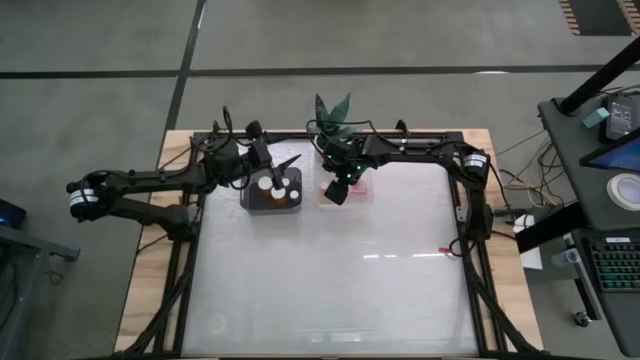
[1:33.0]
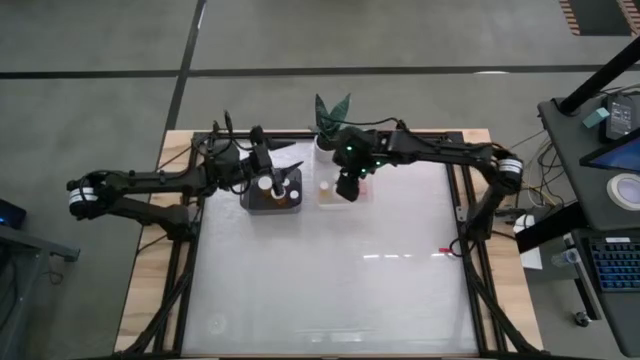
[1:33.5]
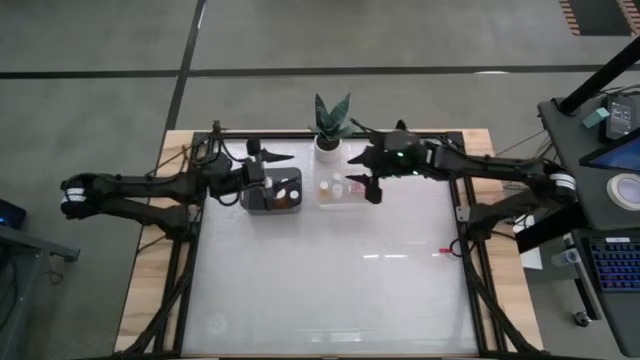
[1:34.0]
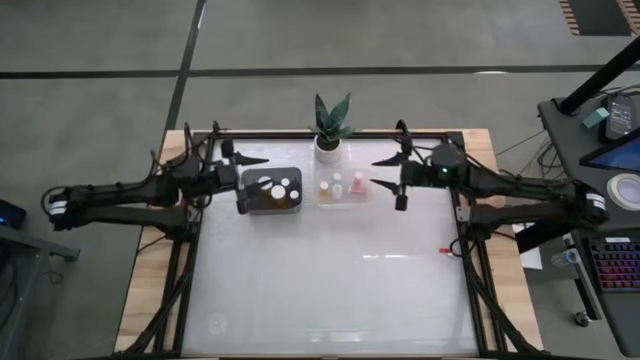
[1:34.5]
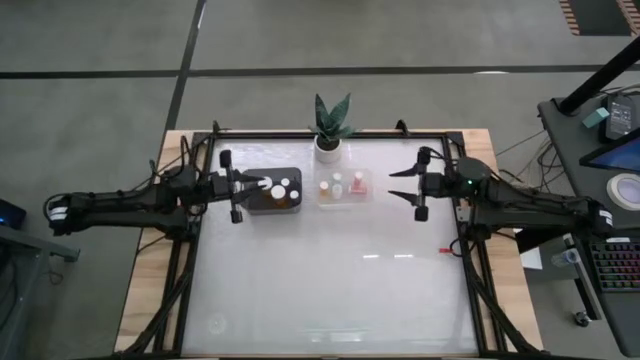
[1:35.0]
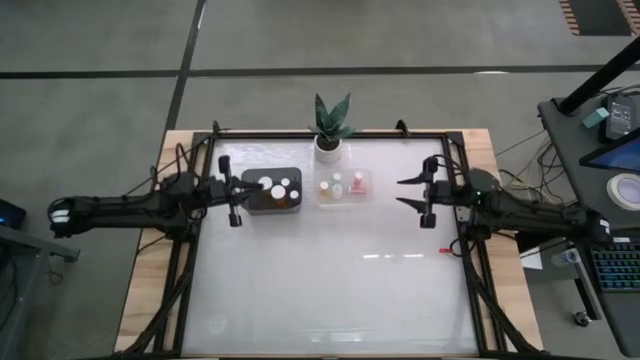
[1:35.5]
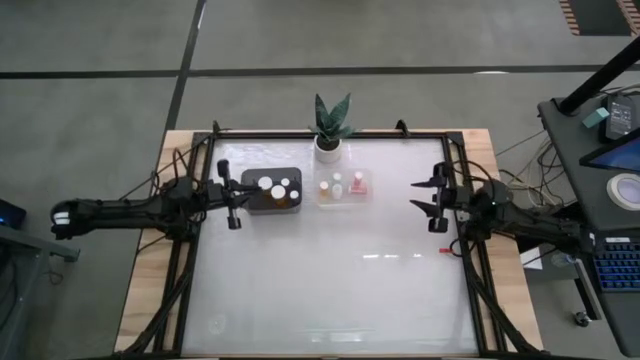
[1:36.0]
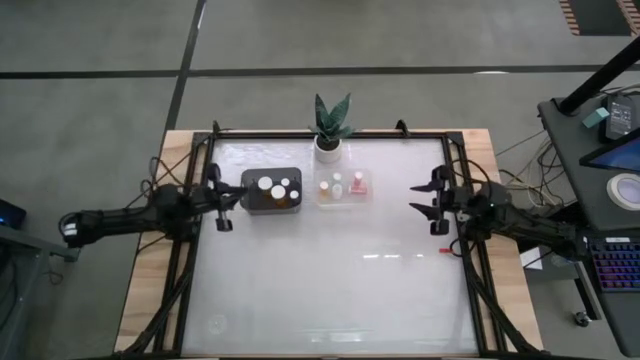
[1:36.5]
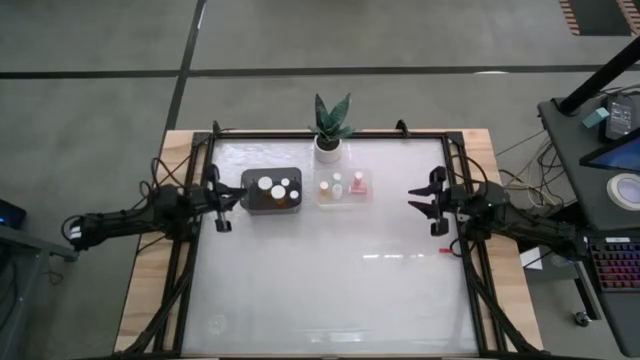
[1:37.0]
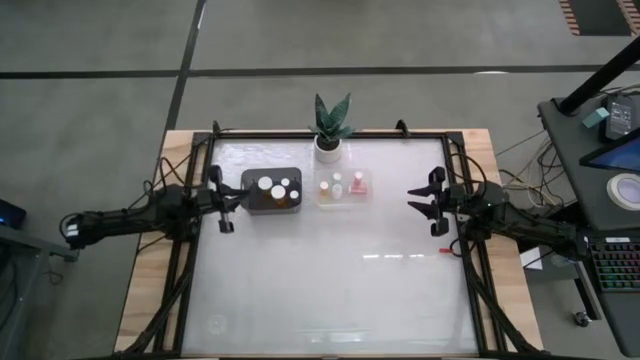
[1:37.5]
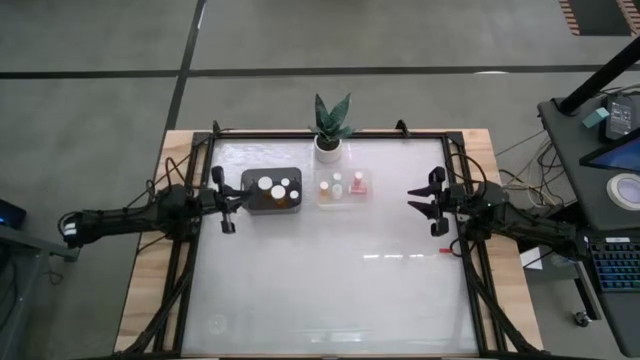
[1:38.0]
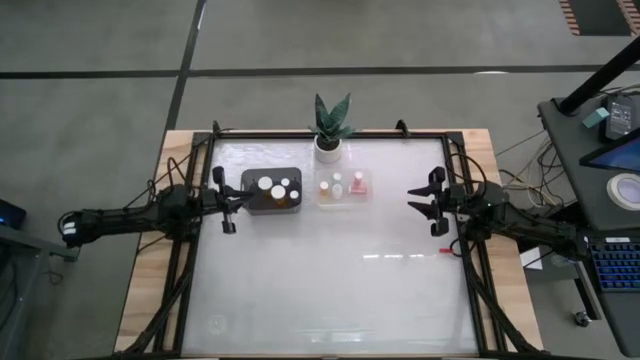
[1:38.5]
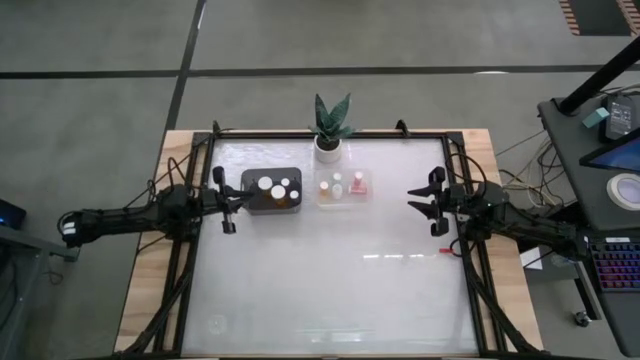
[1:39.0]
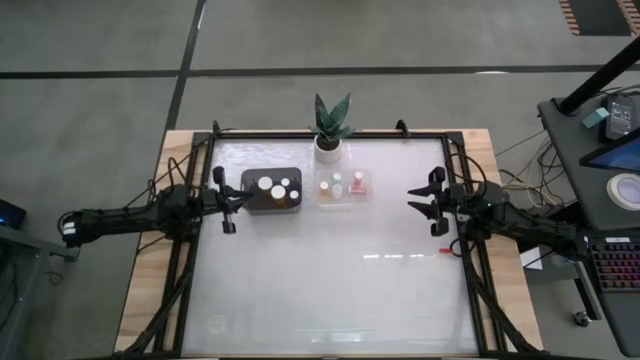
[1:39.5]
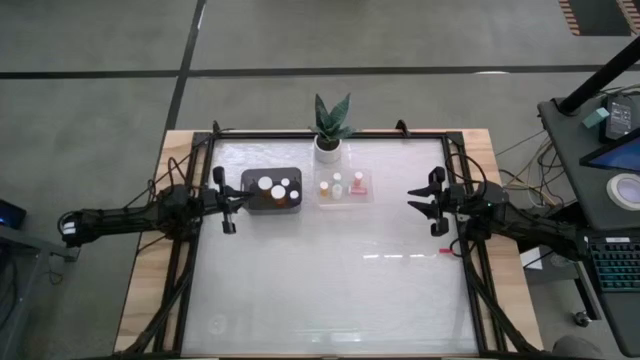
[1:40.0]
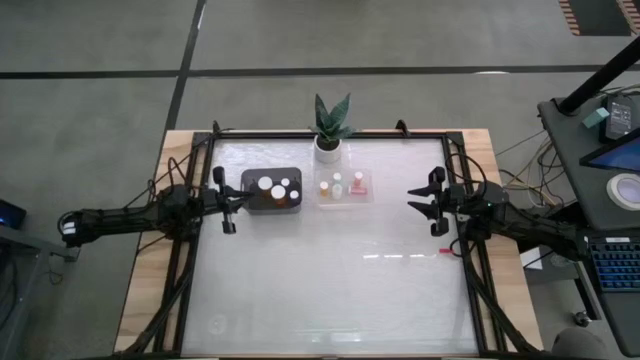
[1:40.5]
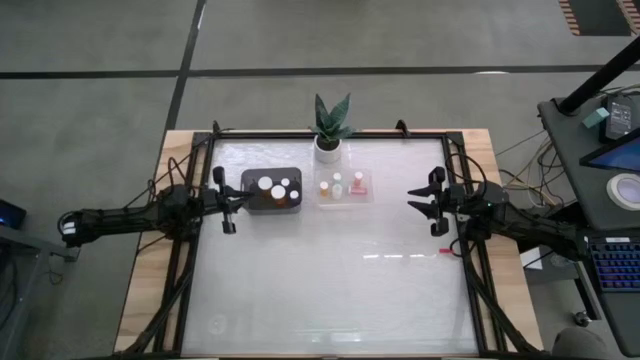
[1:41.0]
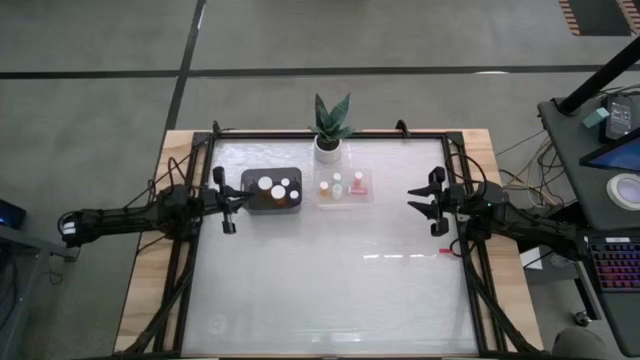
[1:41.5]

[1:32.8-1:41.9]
Task: Pick and place medicine bottles into bin by pill shape (circle, oval)
Return to Home Position

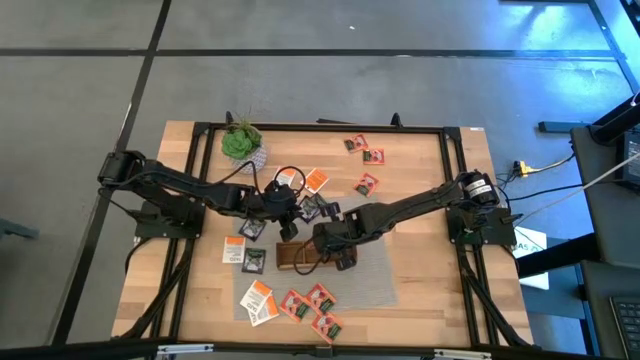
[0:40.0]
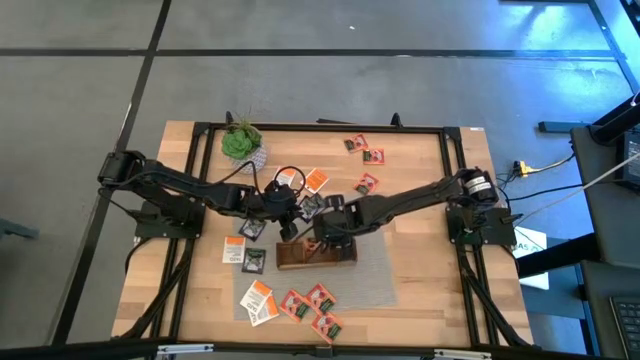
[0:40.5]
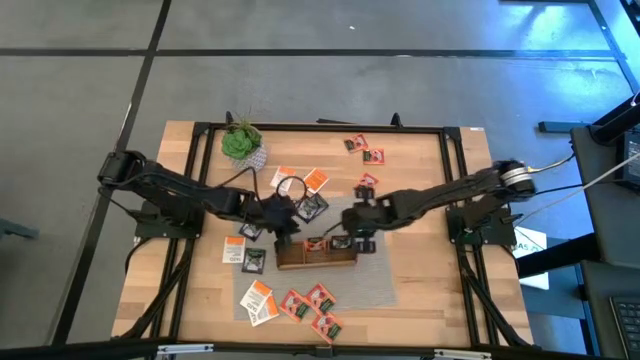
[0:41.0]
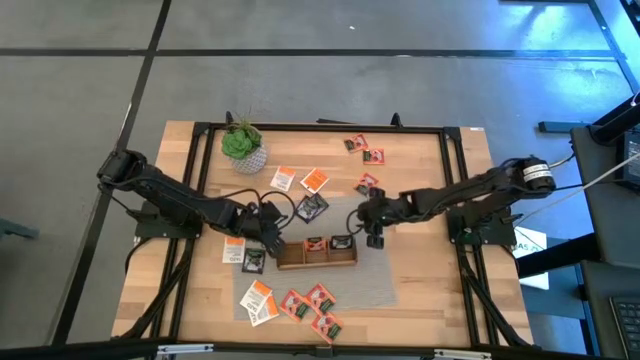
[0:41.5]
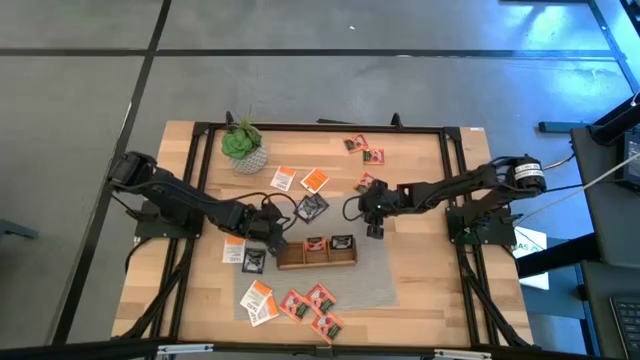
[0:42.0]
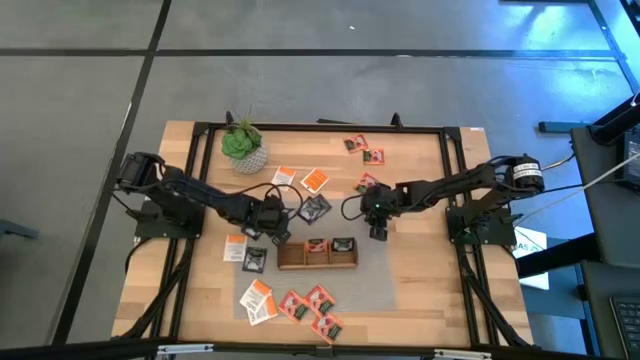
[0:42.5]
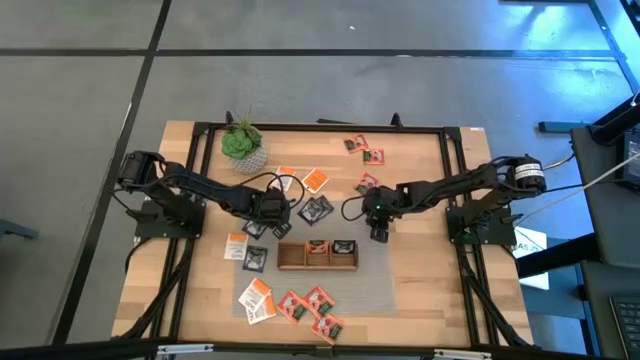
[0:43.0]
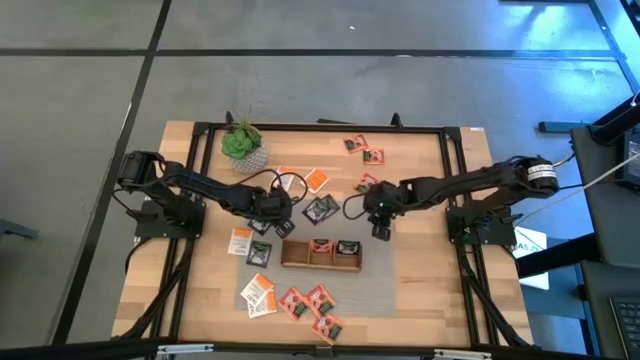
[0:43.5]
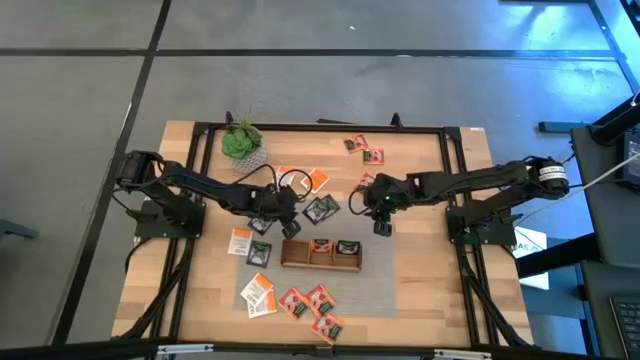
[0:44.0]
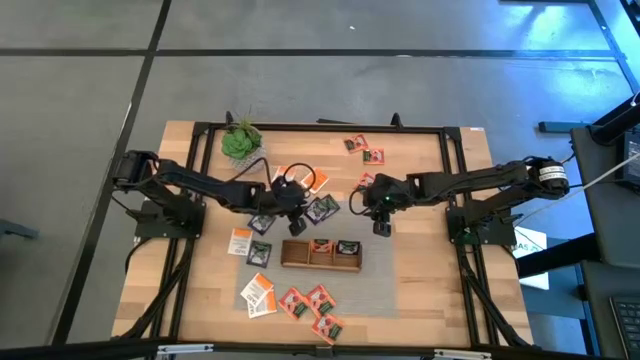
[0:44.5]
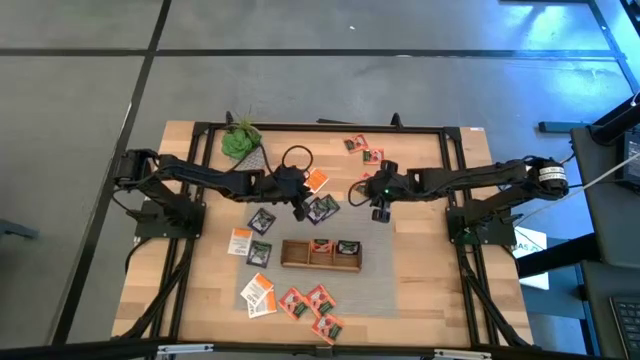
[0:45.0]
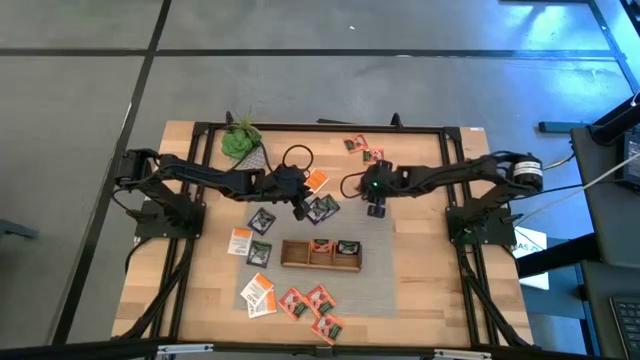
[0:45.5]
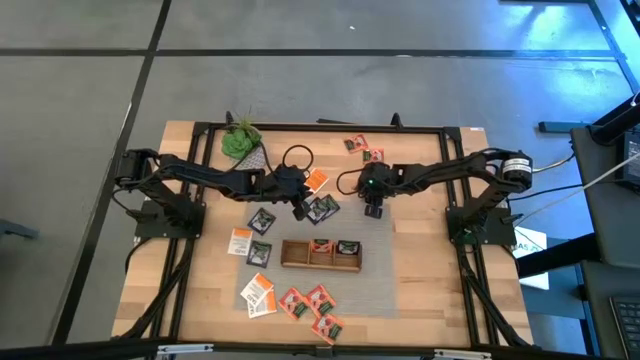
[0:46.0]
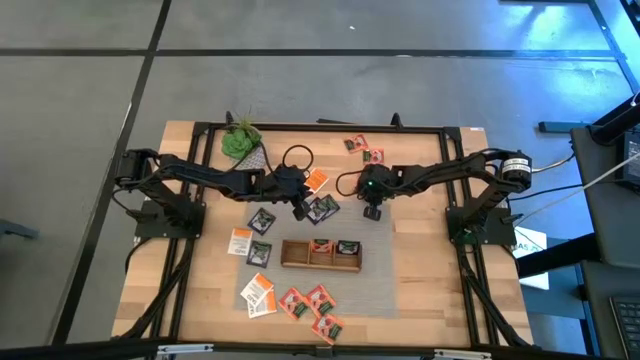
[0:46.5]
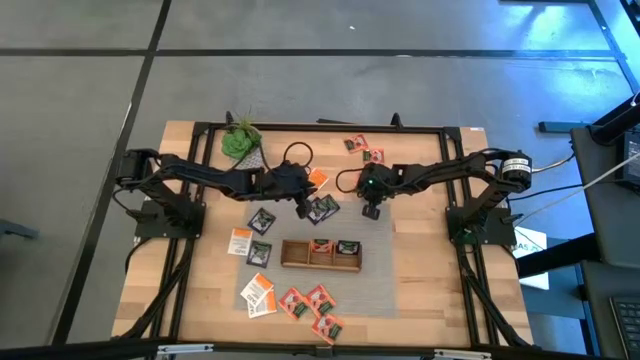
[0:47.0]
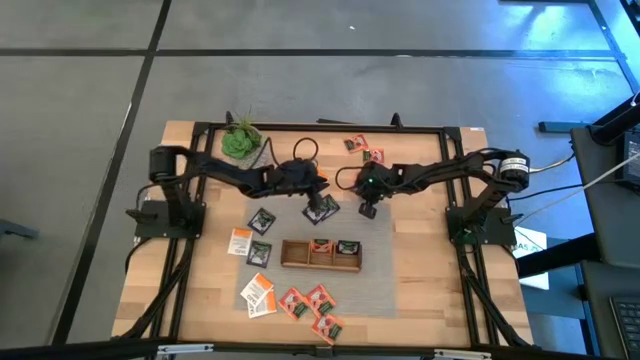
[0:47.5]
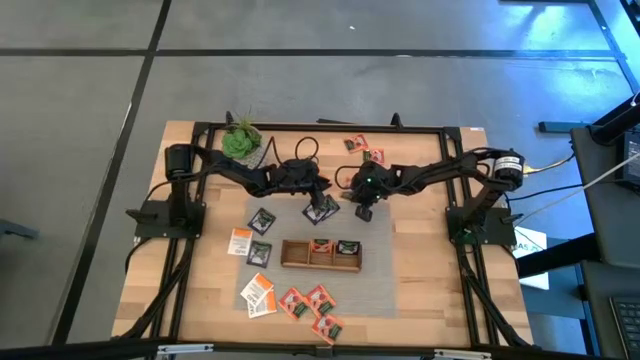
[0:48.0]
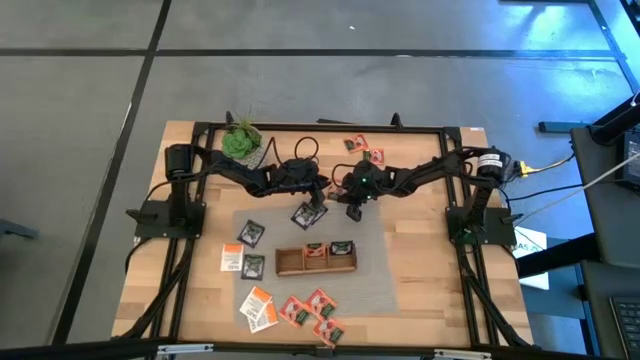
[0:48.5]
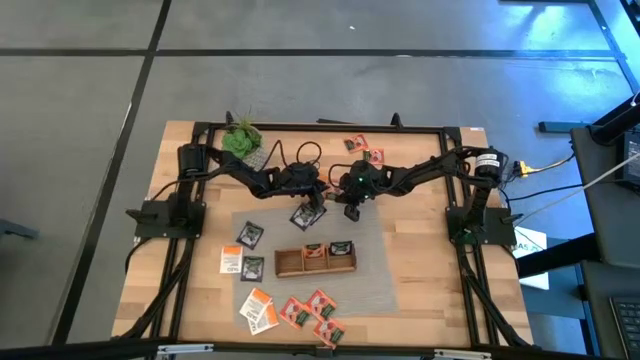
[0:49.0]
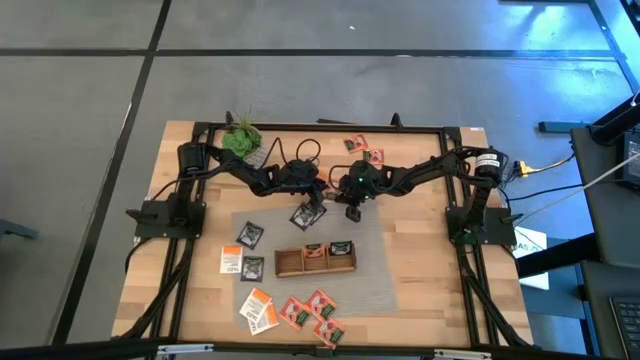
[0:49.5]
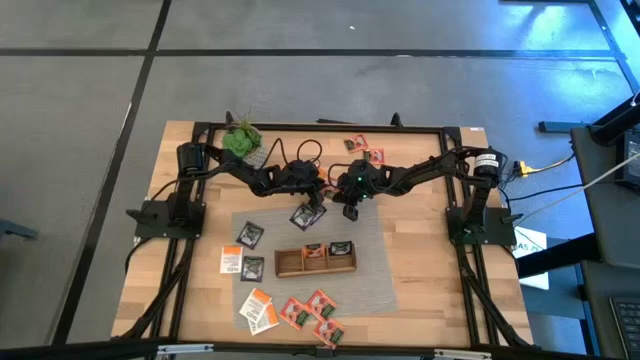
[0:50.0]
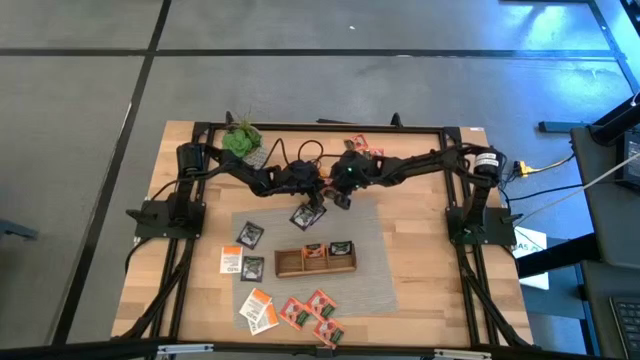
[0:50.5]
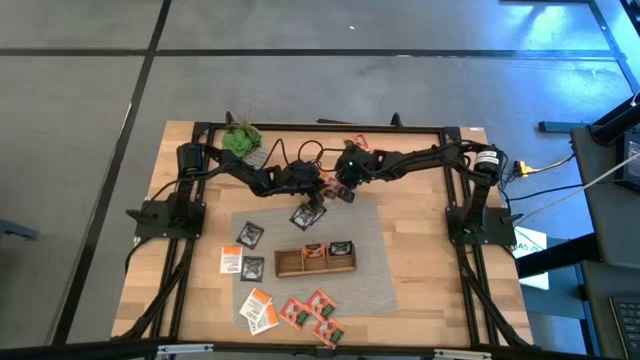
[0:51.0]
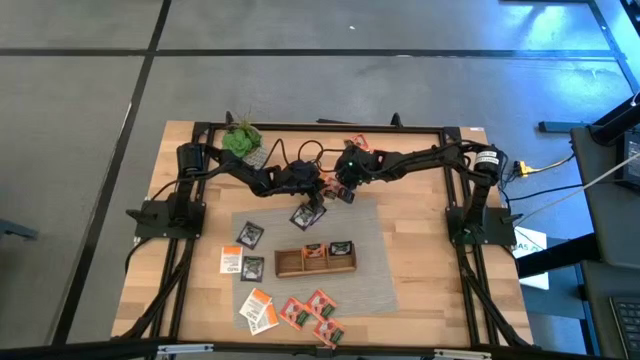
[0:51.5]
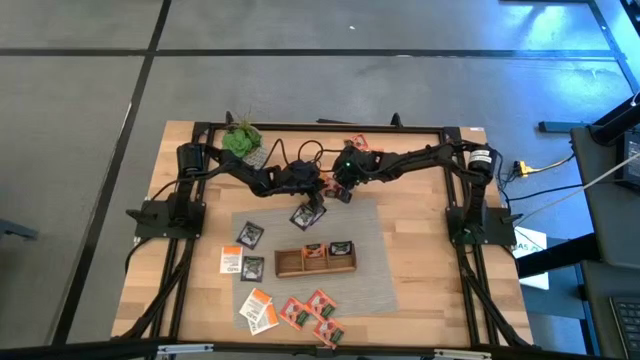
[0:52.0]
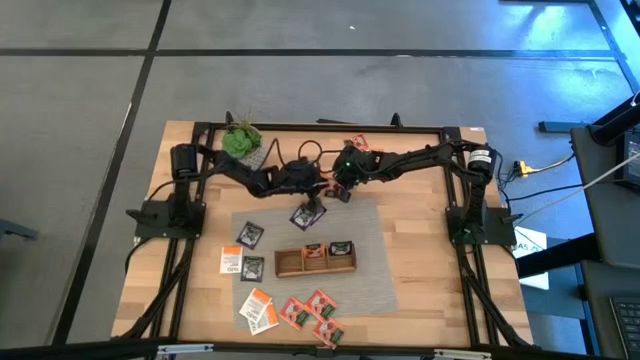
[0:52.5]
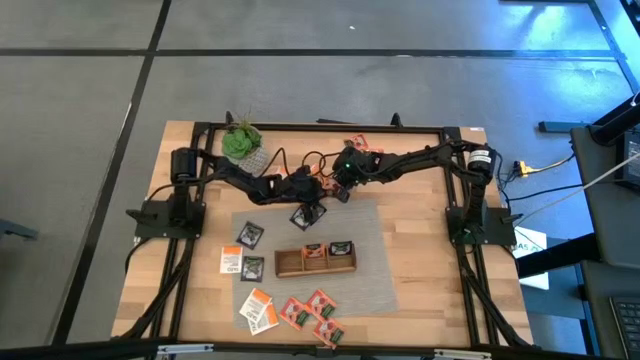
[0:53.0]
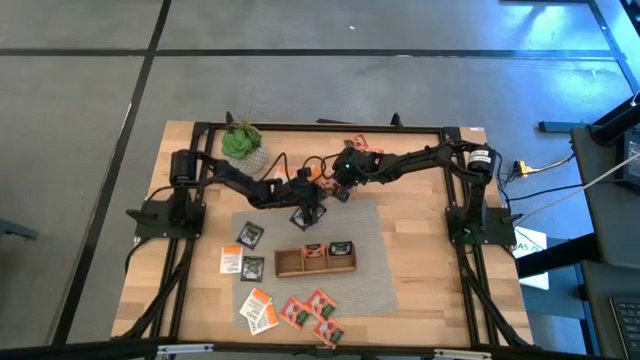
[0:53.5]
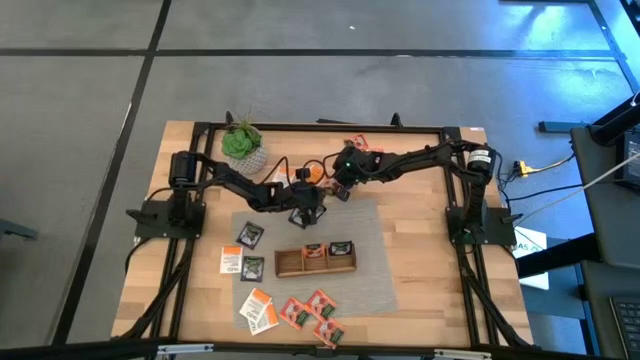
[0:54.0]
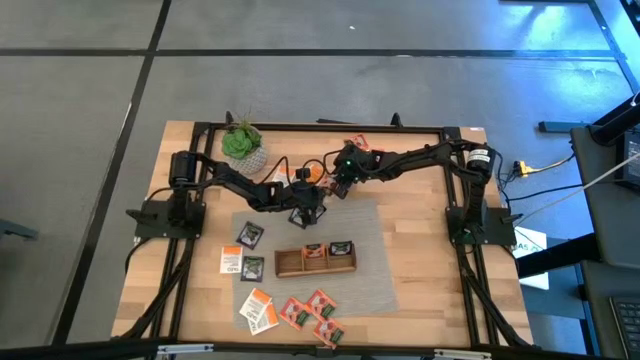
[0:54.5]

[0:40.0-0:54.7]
Task: Pick & Place Tea
Put the orange tea bag into the middle section of the wooden organizer
